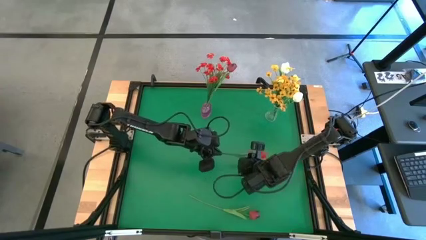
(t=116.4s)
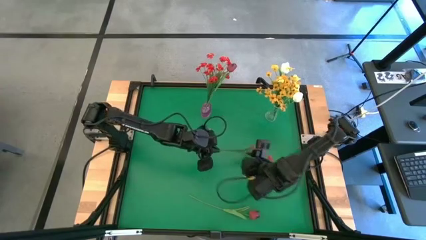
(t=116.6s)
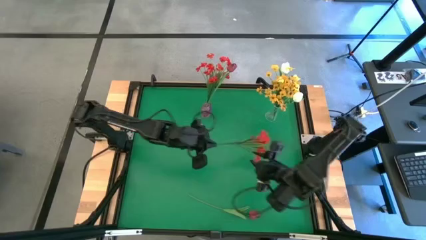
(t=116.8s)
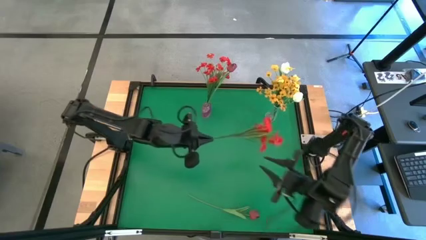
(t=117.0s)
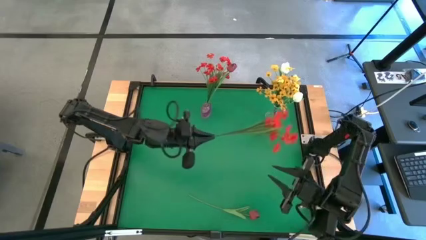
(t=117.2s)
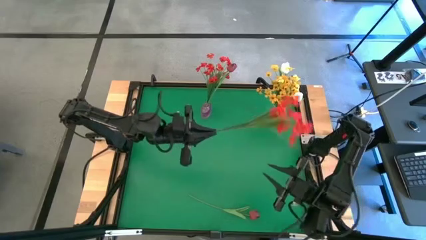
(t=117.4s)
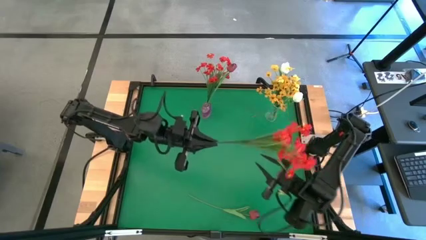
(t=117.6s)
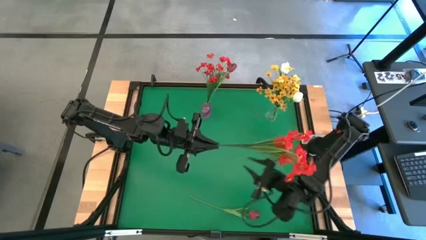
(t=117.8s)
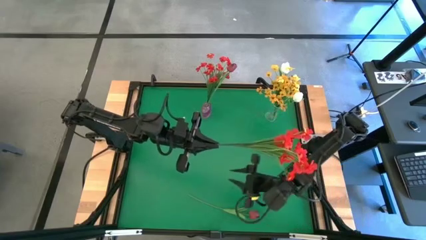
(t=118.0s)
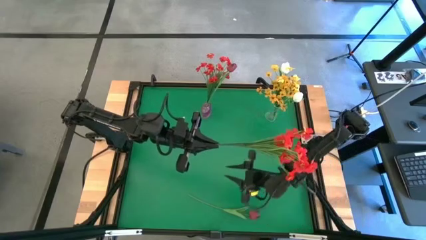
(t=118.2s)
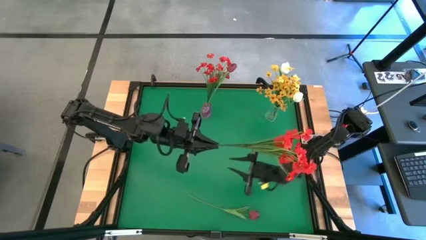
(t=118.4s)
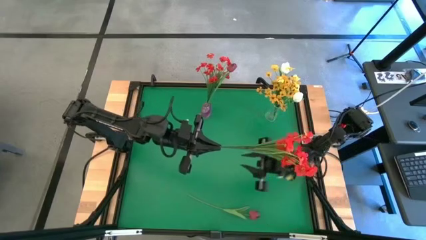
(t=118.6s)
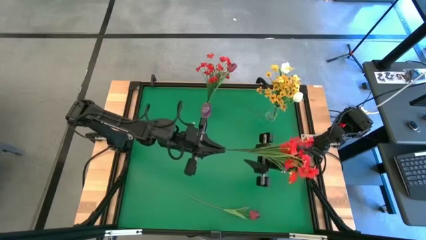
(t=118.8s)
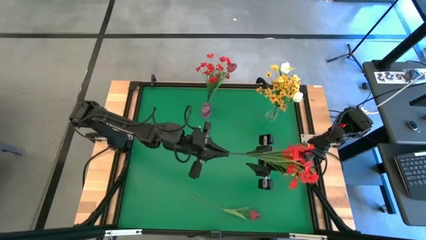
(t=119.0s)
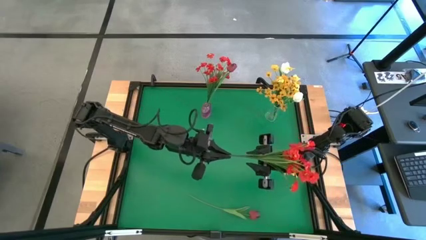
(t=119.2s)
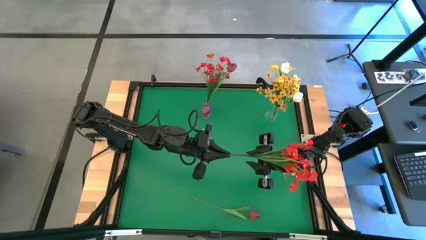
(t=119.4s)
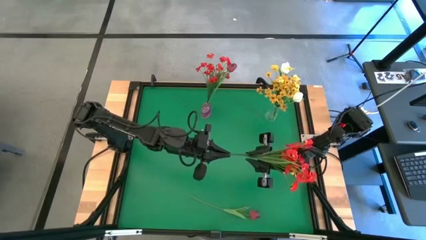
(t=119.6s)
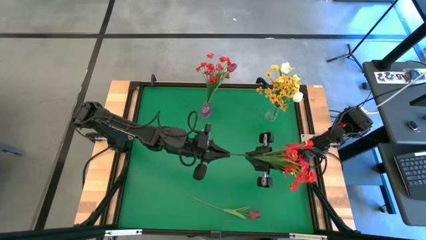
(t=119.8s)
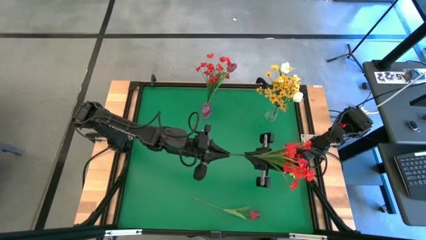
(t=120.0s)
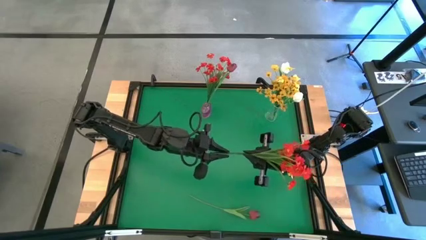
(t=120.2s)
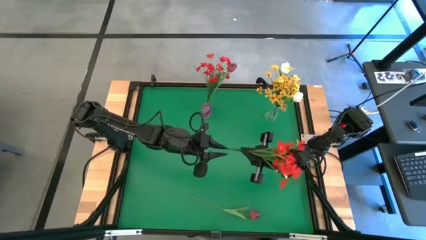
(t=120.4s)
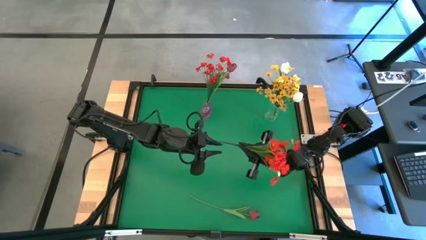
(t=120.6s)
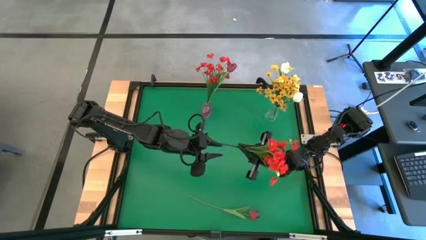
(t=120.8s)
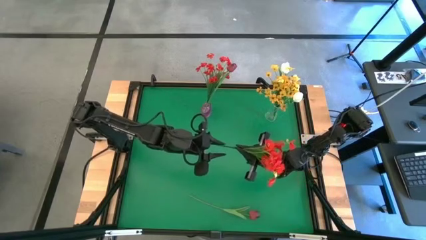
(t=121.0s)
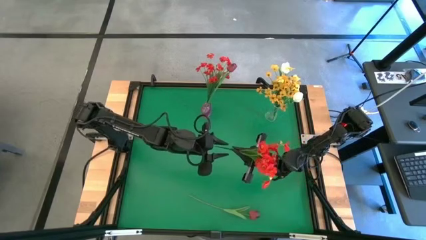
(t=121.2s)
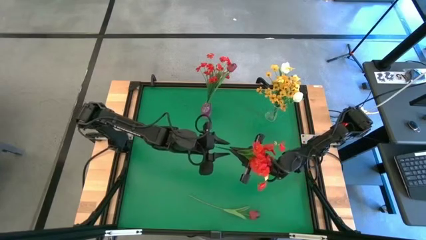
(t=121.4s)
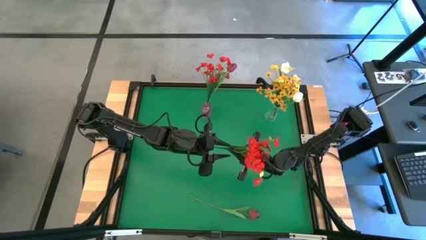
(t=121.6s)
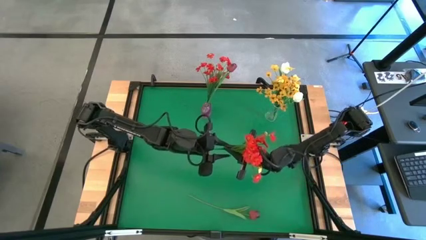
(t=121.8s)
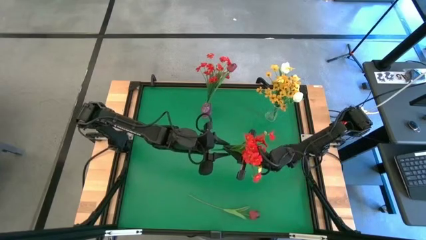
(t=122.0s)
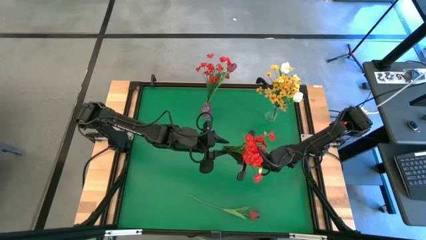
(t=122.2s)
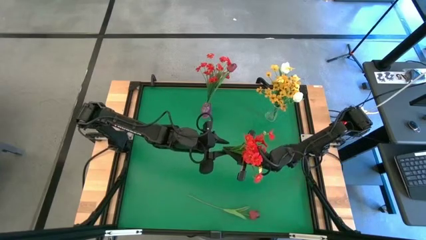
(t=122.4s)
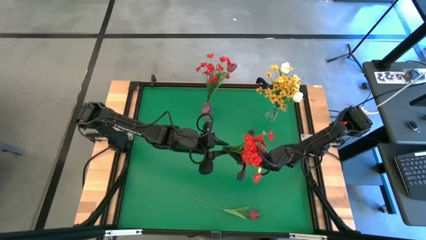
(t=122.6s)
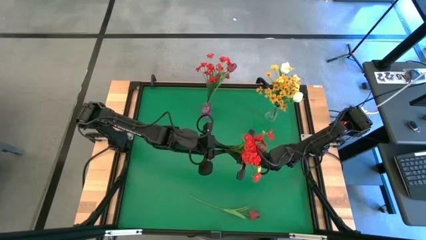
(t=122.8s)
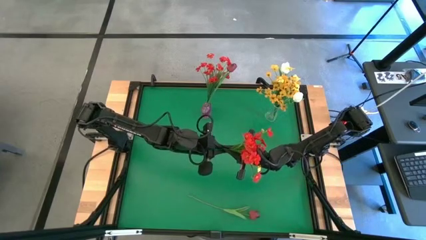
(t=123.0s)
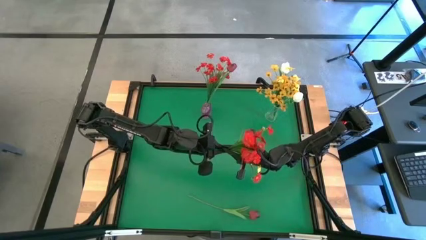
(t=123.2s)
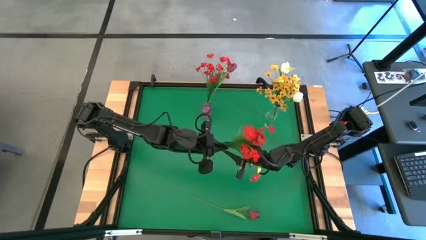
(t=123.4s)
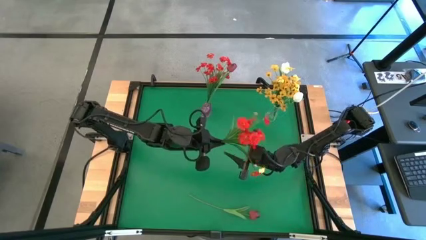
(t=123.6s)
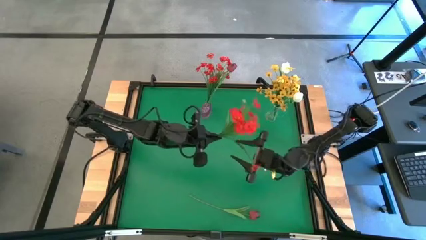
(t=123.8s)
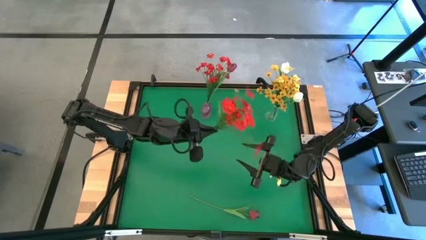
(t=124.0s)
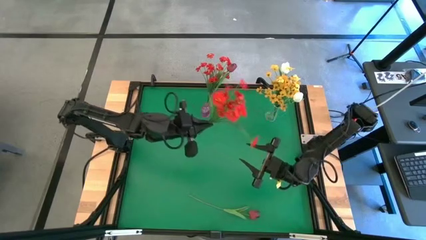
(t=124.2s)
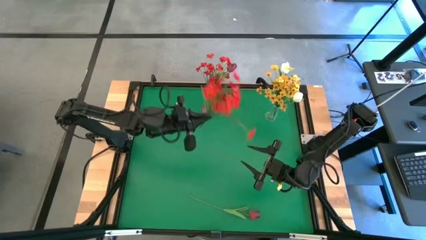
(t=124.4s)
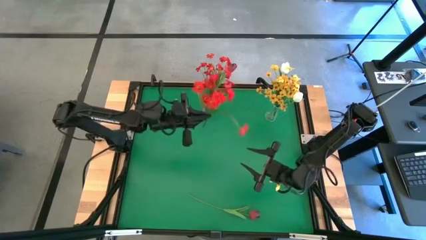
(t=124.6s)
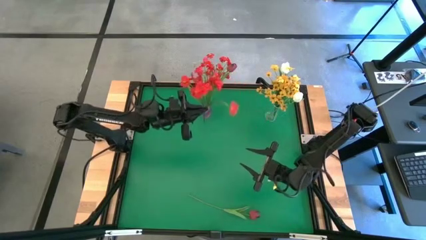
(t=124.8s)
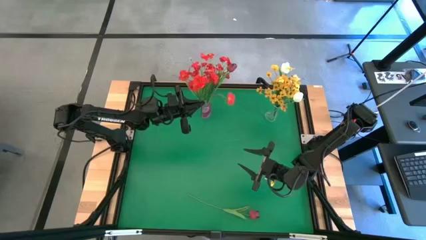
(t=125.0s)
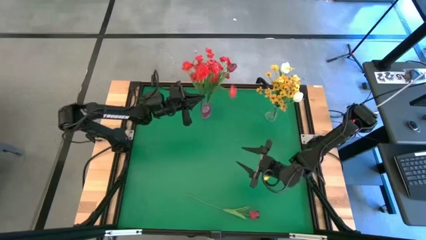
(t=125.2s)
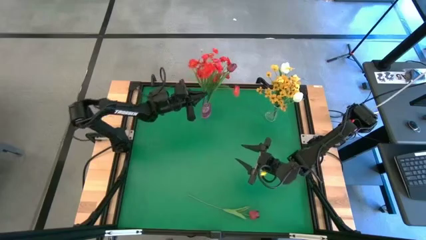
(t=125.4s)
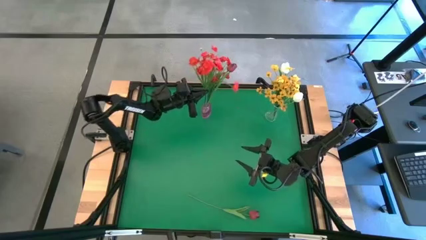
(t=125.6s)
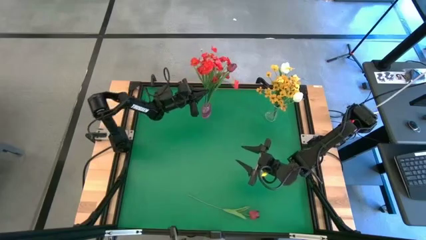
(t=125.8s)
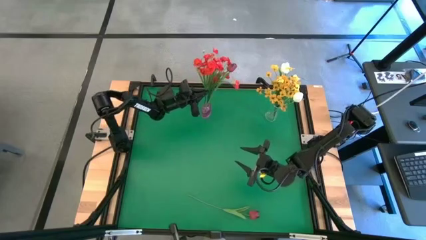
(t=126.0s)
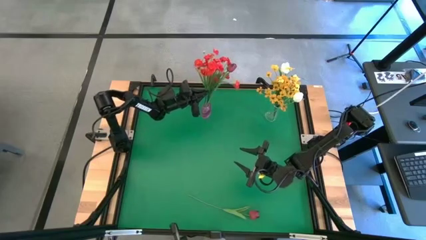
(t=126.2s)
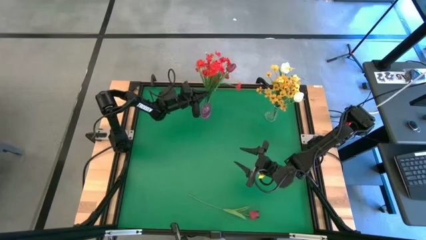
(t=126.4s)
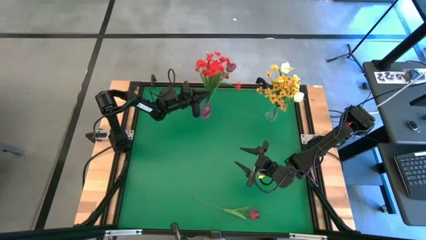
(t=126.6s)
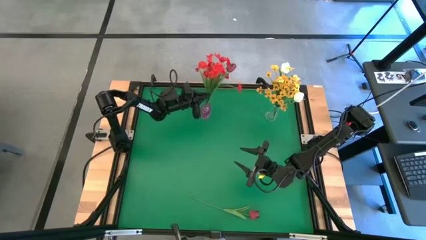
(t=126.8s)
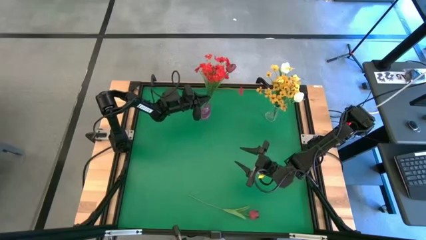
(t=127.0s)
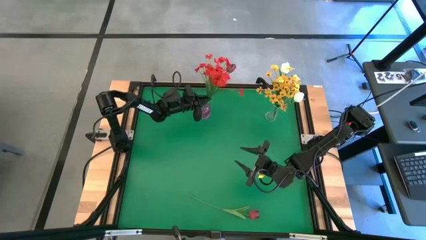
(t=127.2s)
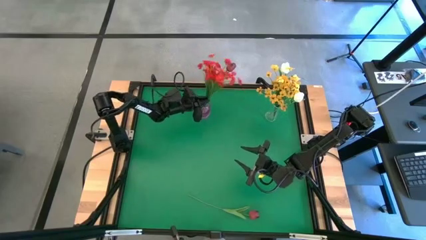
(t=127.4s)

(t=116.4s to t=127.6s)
Task: Sort flowers into vase by color
Put the red flowers into the pink transparent vase

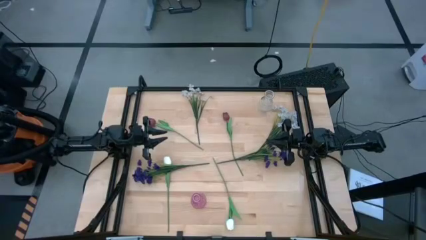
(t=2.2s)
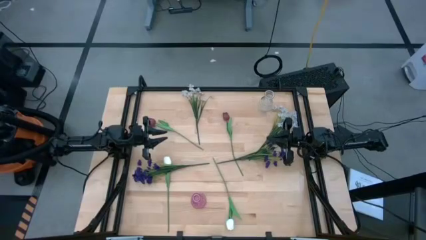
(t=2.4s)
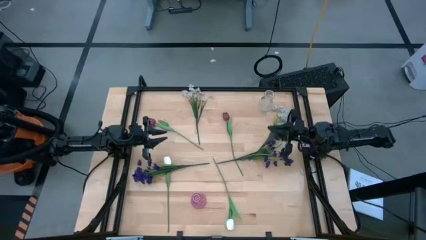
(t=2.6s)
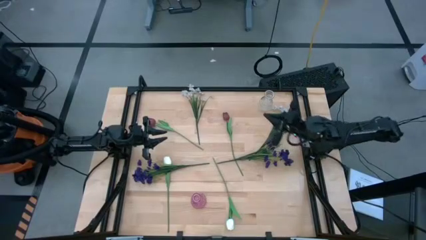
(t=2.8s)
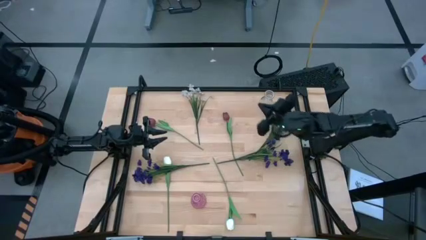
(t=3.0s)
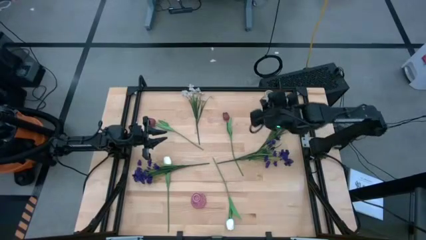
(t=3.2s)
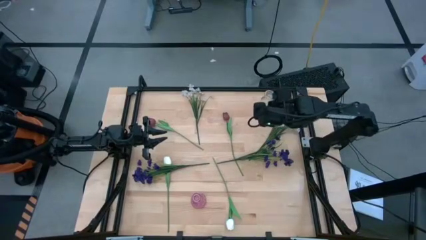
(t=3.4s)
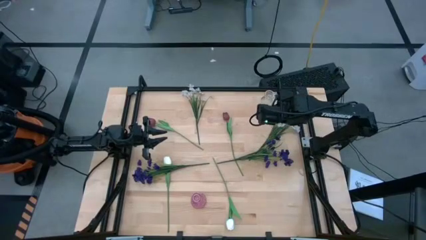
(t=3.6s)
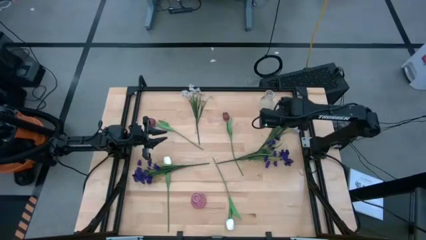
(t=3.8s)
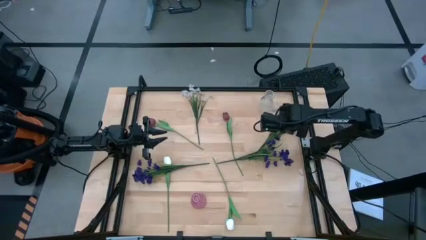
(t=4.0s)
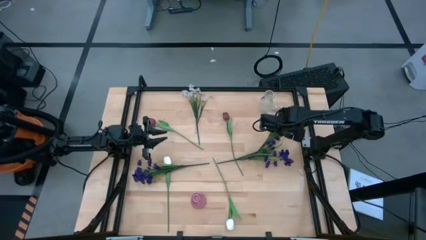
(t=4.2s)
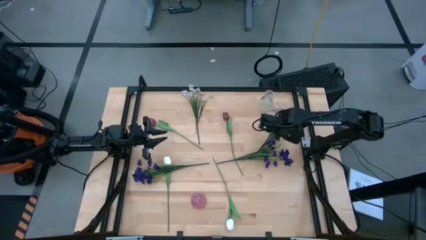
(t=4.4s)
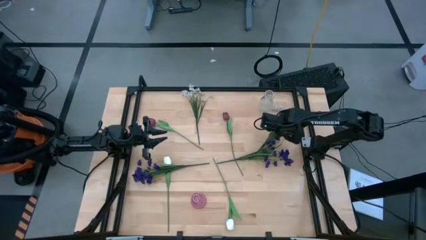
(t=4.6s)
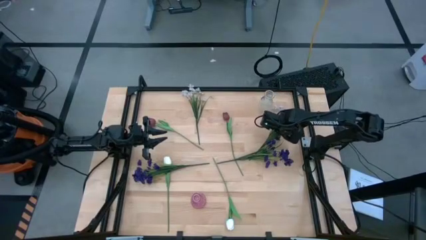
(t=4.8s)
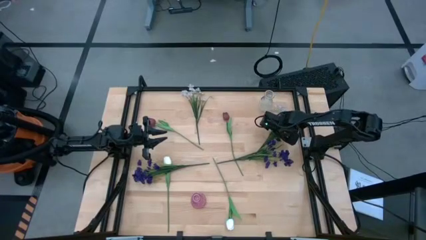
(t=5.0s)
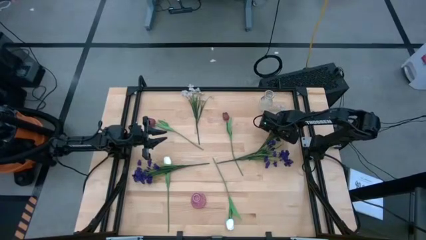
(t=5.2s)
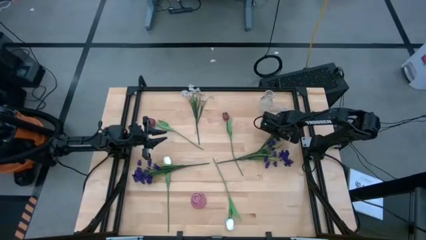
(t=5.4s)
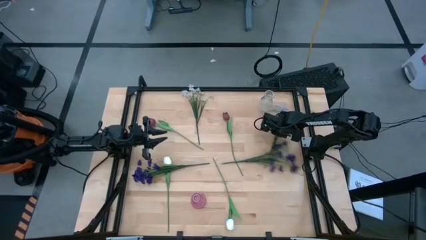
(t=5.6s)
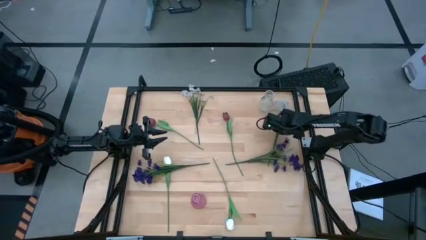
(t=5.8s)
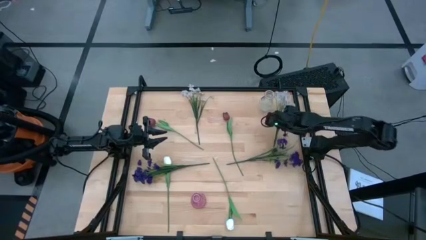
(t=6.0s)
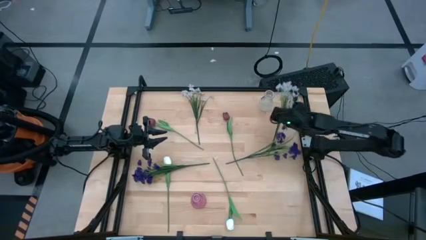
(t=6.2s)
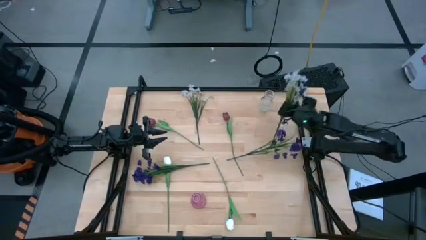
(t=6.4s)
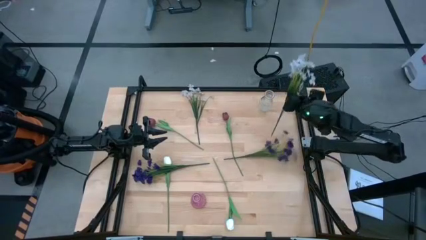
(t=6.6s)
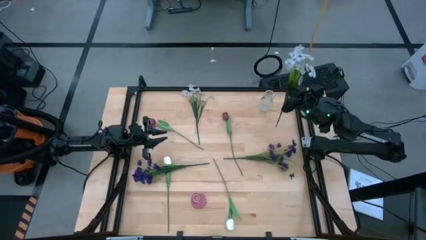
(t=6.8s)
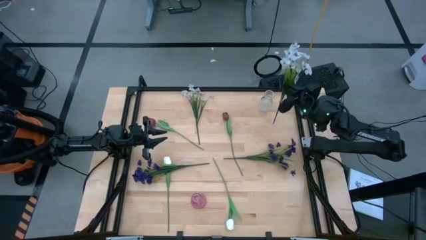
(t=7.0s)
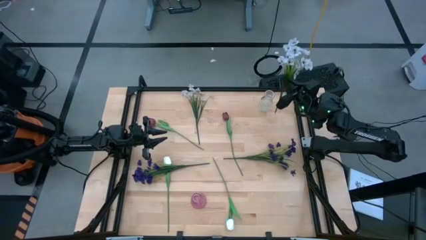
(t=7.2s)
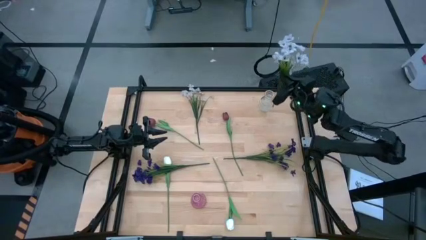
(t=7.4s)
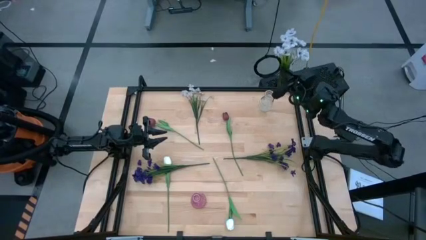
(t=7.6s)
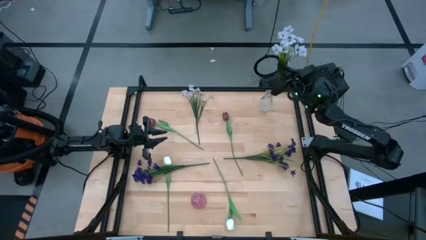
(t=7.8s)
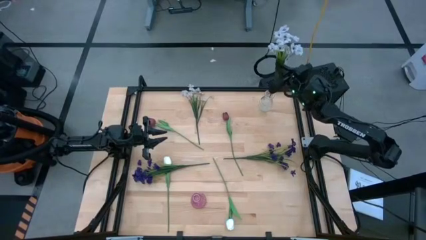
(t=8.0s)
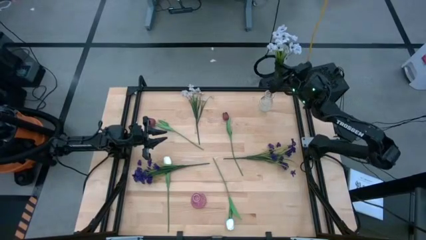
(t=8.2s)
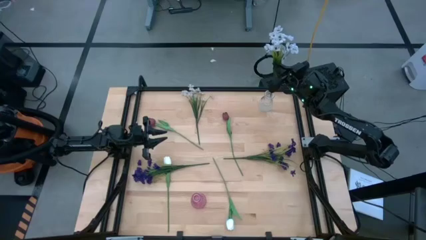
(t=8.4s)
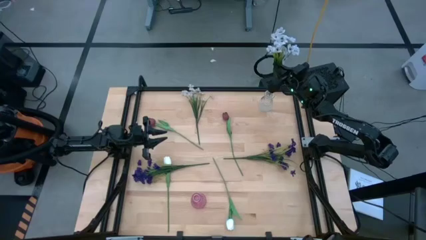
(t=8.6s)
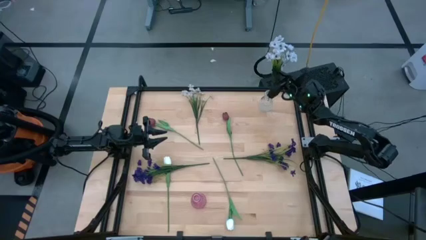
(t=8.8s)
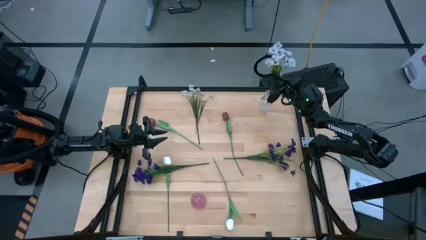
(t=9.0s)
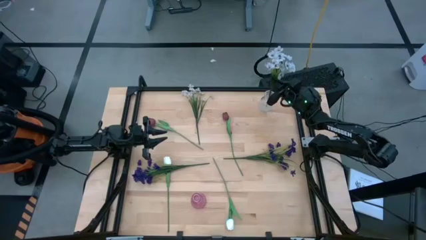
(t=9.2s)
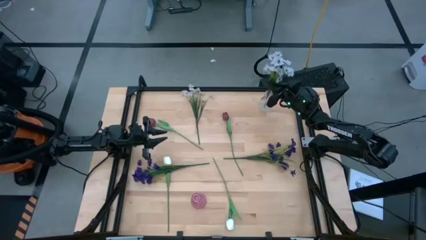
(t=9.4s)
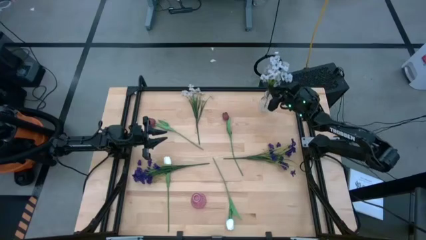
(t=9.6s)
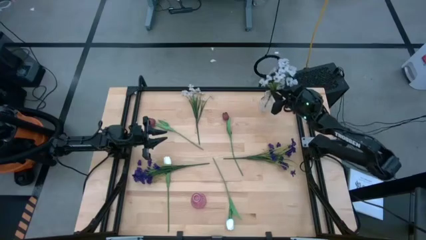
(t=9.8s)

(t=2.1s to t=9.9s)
Task: Sort flowers into vase by color
Put the white flower into the transparent vase
